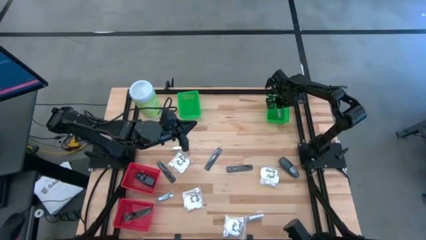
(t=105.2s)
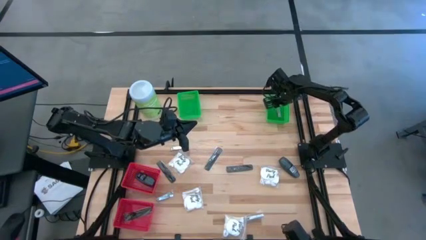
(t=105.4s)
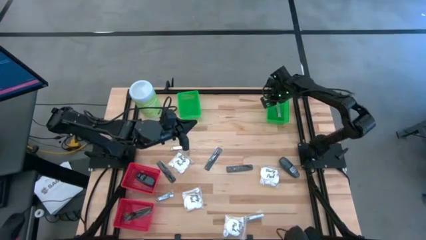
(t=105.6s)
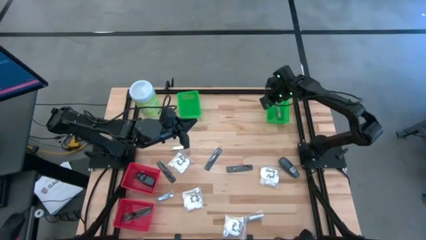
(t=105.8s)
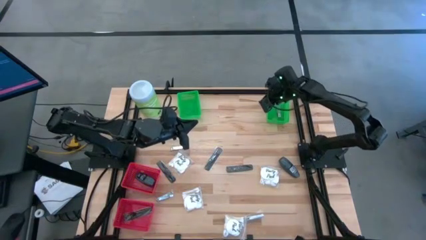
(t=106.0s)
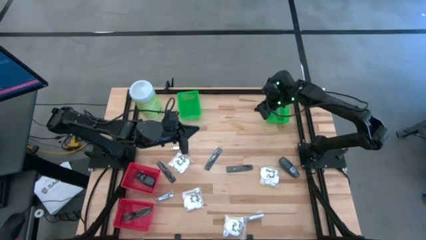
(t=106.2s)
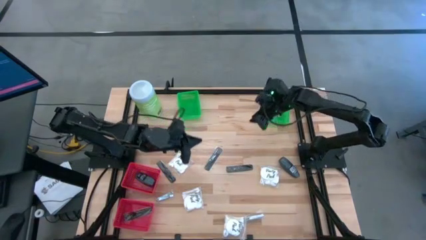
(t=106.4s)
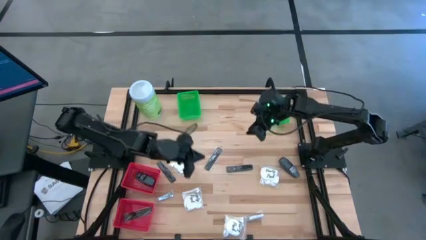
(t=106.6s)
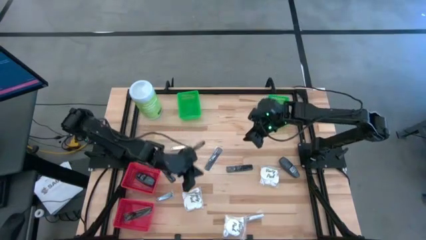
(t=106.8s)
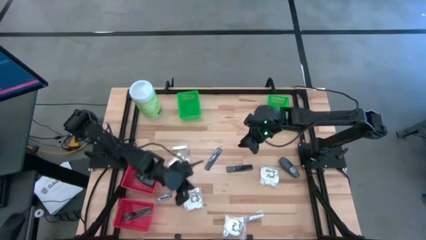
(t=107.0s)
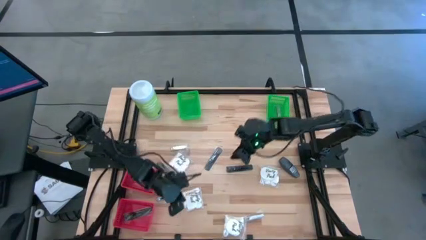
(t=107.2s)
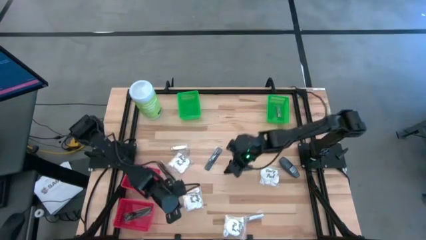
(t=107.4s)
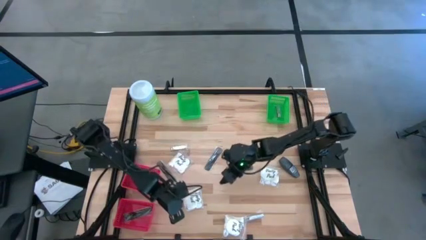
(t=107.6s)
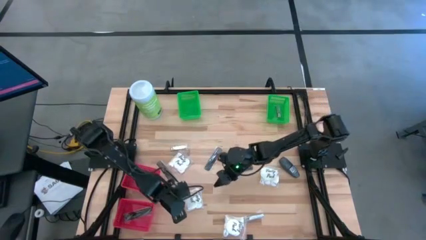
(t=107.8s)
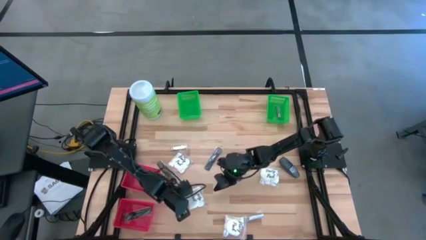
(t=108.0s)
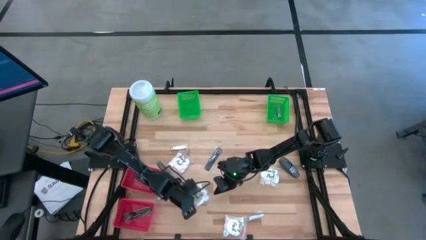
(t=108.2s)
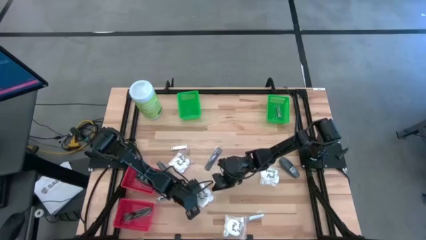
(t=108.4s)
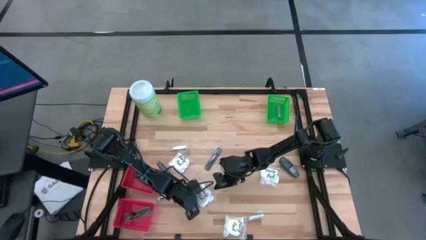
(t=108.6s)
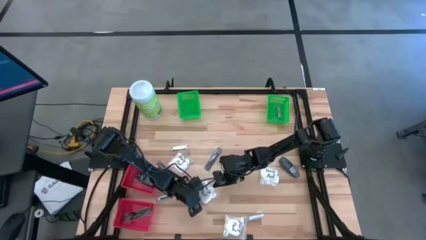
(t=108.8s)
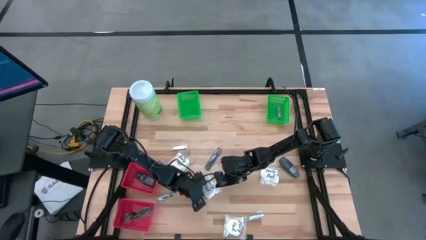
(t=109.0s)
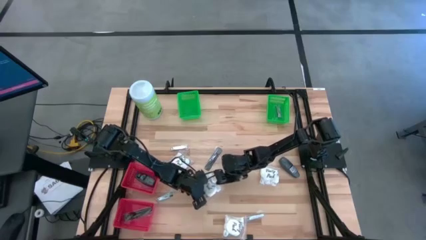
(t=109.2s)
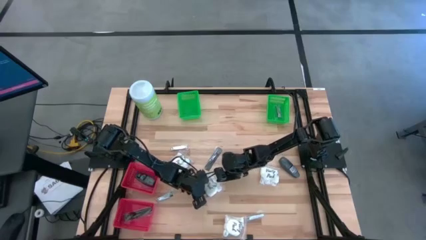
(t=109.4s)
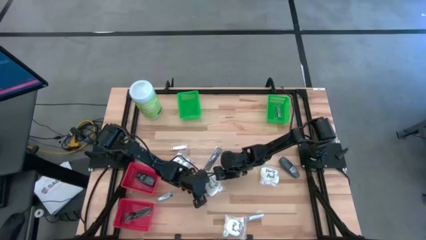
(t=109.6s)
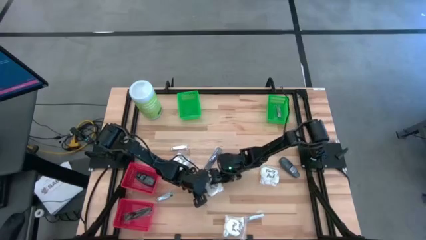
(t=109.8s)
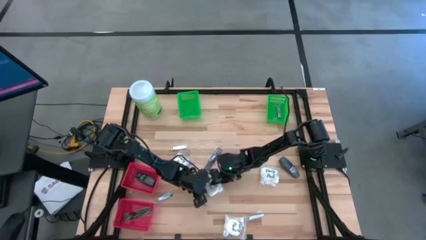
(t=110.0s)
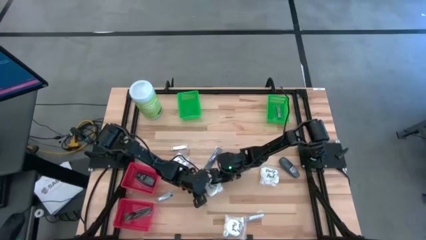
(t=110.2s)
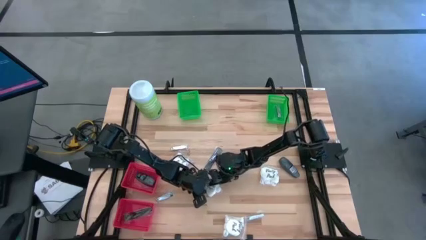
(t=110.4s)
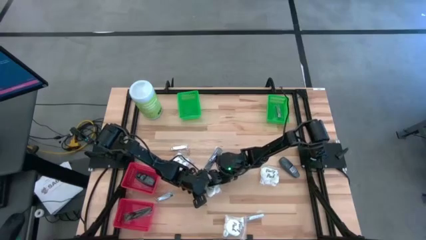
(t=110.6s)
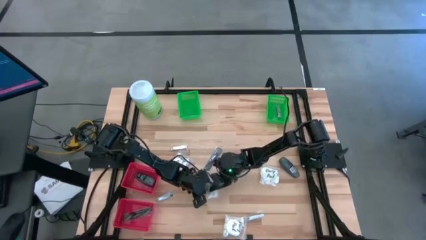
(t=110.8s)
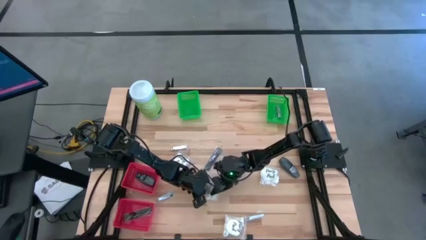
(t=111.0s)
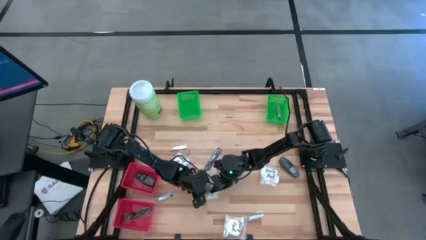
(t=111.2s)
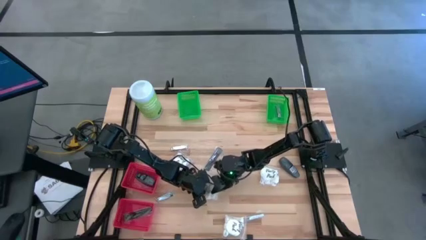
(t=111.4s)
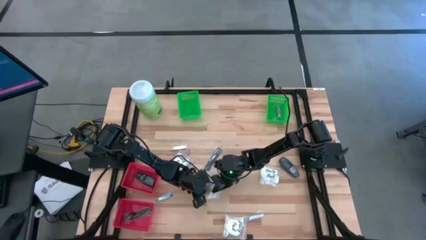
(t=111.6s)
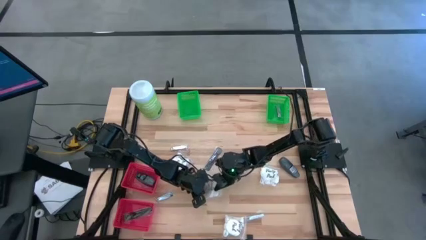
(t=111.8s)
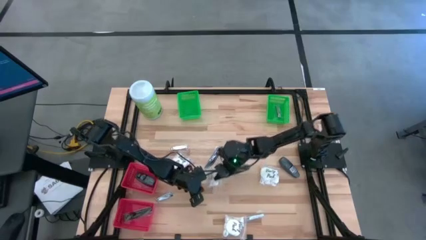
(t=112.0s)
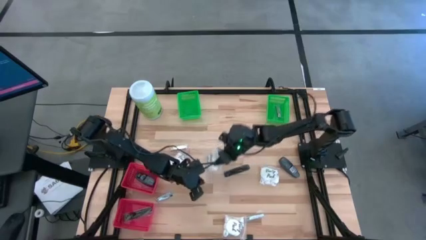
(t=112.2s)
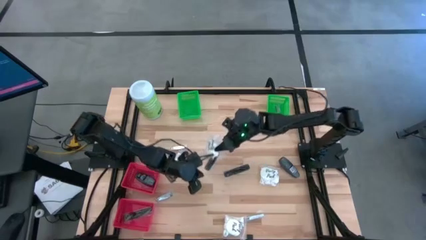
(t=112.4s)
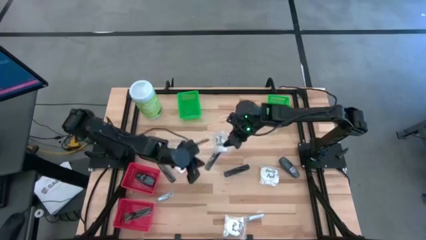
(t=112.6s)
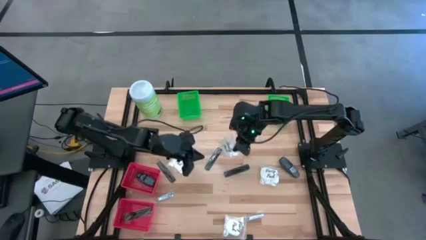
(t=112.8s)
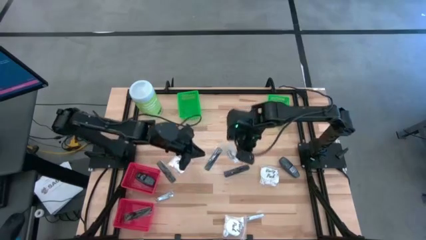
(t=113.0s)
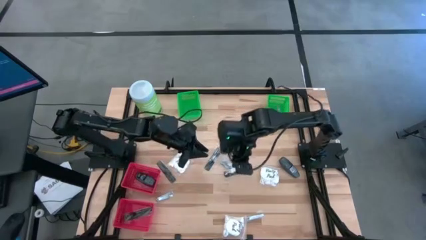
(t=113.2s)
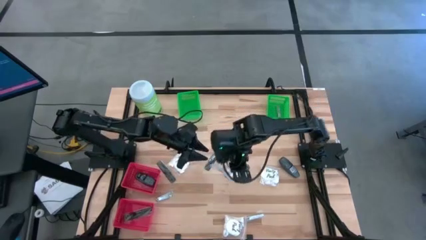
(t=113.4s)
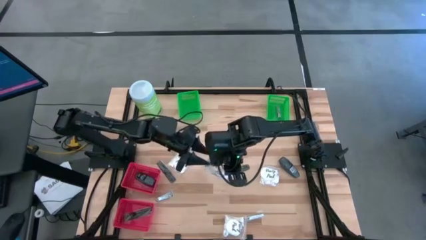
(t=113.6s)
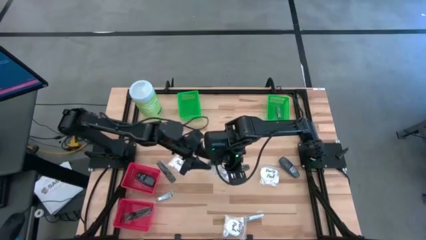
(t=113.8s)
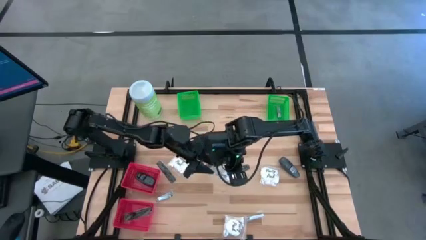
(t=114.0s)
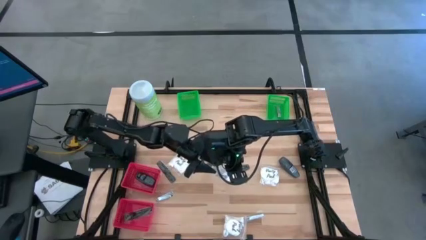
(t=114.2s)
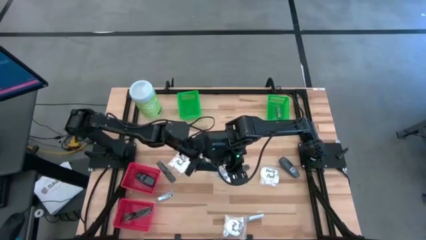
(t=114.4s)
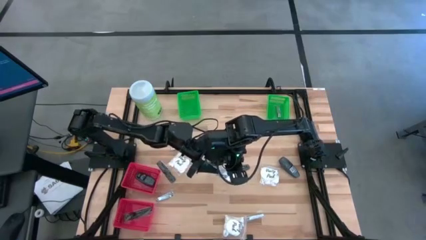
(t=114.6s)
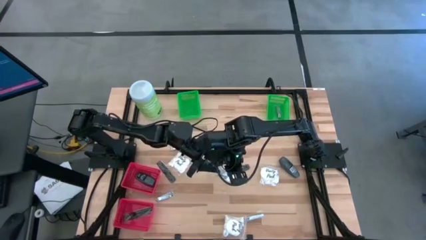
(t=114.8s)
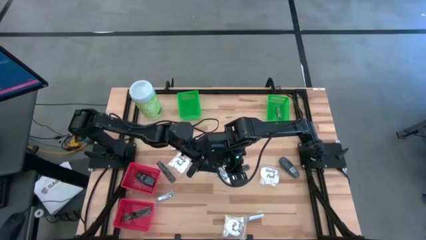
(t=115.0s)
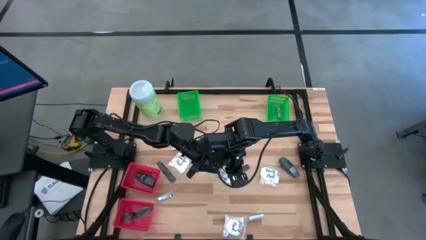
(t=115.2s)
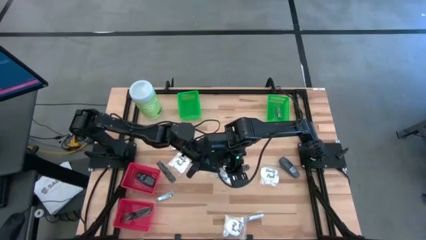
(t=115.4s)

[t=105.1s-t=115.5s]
Task: Pick & Place Travel size toiletries
Put the white vanity pack into the top left green basket

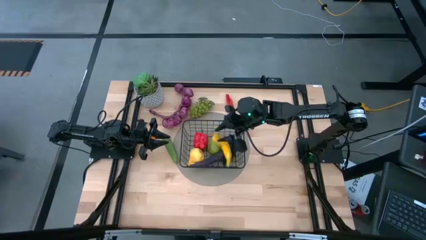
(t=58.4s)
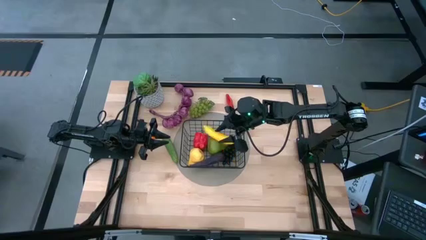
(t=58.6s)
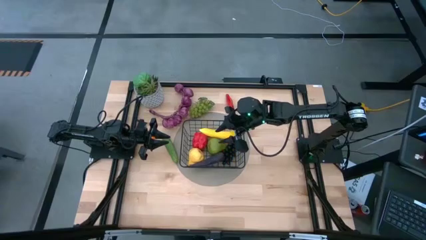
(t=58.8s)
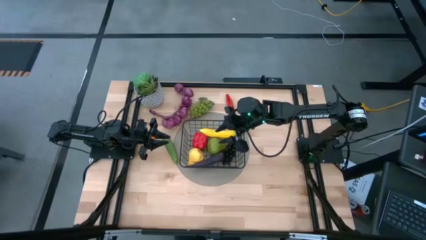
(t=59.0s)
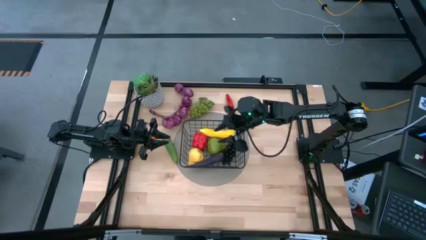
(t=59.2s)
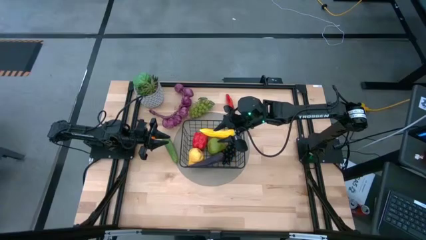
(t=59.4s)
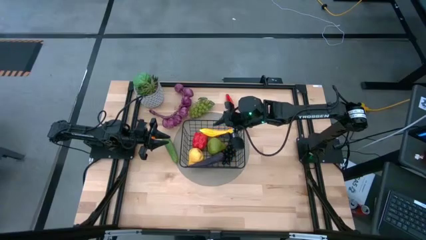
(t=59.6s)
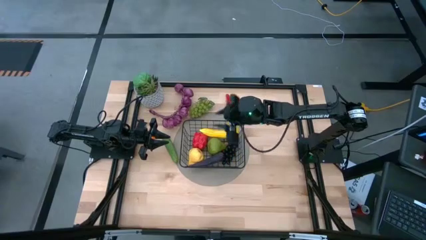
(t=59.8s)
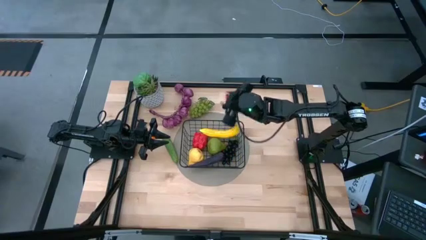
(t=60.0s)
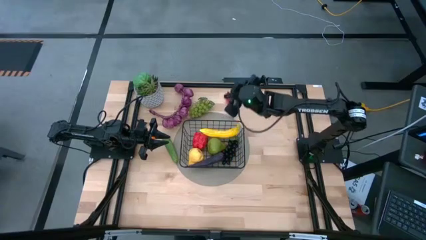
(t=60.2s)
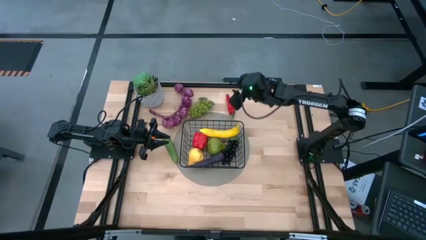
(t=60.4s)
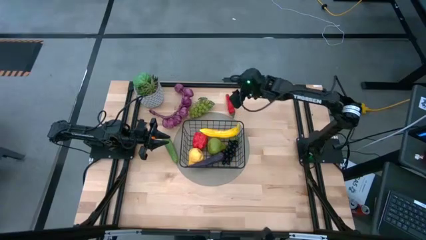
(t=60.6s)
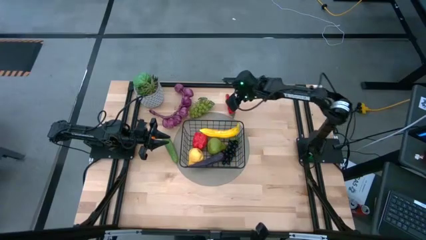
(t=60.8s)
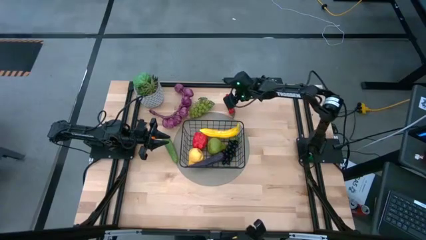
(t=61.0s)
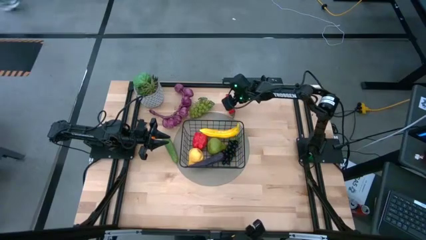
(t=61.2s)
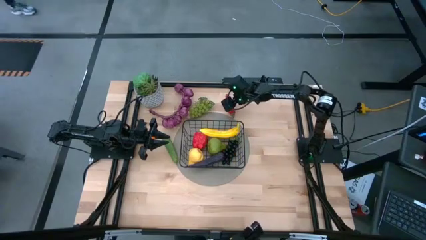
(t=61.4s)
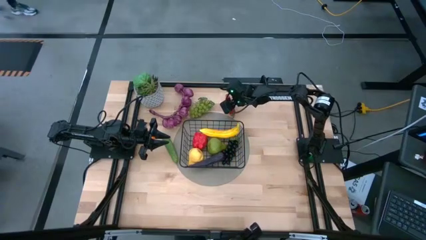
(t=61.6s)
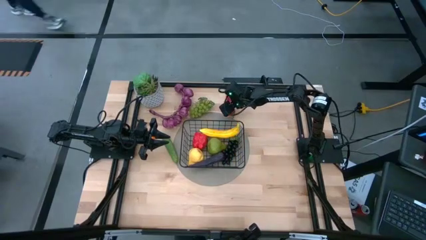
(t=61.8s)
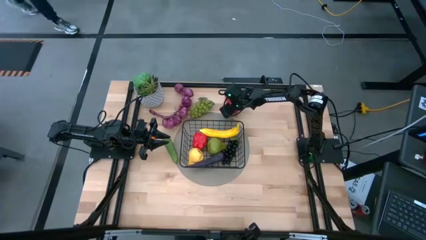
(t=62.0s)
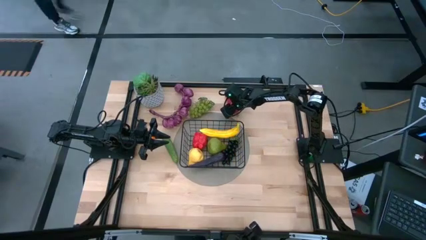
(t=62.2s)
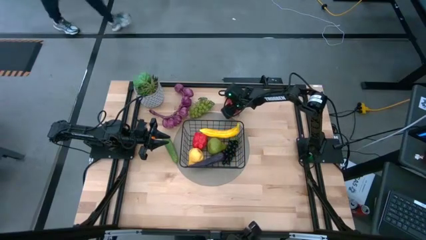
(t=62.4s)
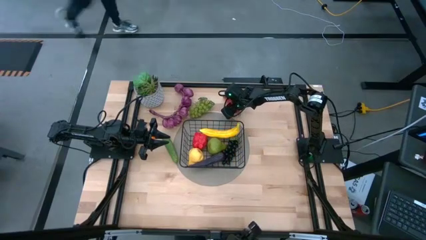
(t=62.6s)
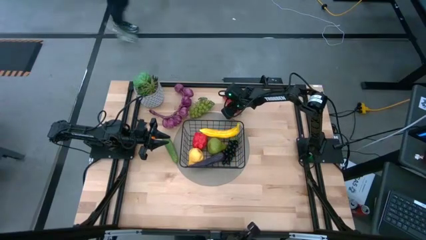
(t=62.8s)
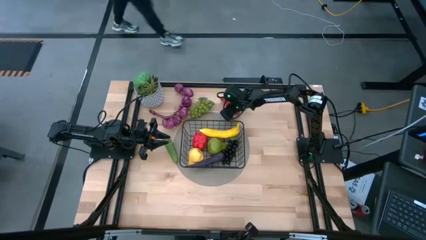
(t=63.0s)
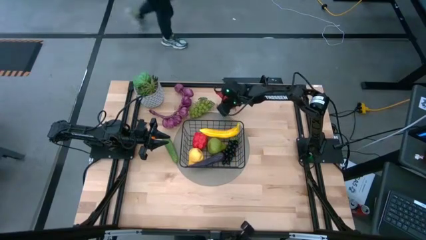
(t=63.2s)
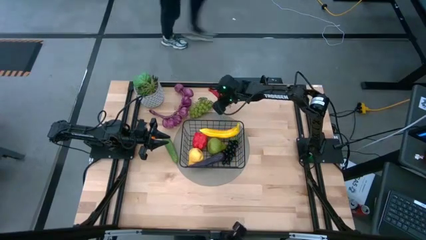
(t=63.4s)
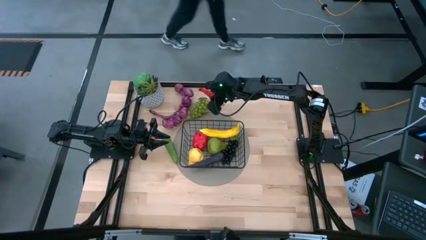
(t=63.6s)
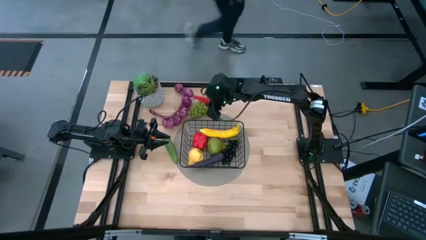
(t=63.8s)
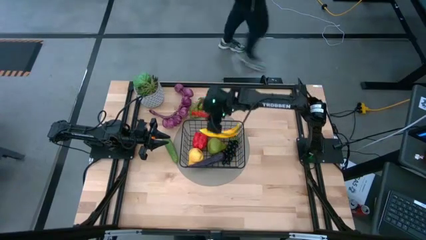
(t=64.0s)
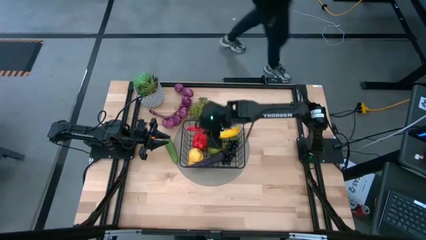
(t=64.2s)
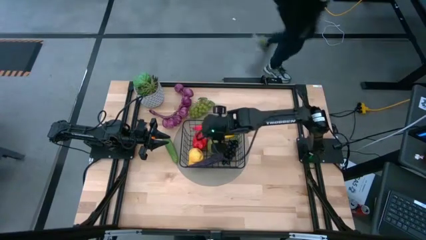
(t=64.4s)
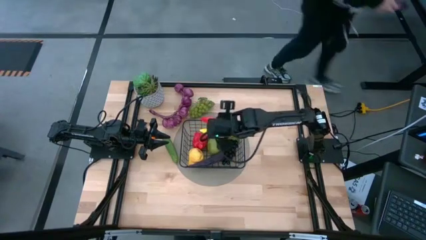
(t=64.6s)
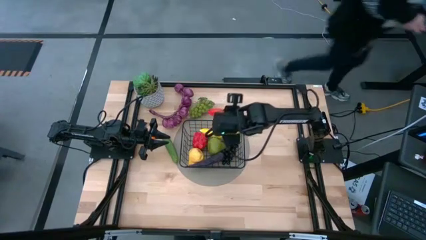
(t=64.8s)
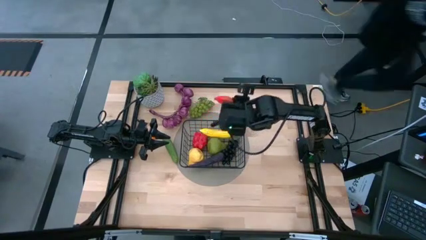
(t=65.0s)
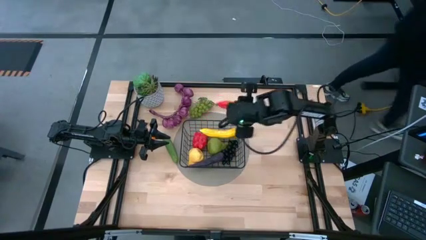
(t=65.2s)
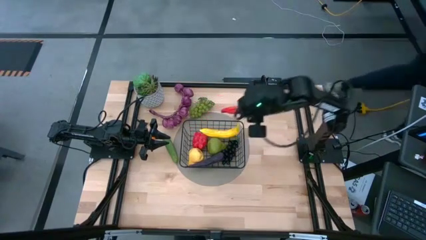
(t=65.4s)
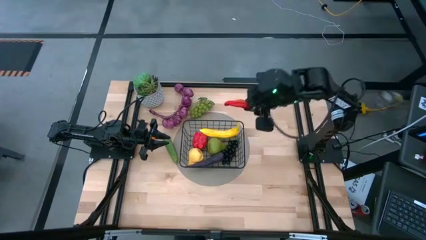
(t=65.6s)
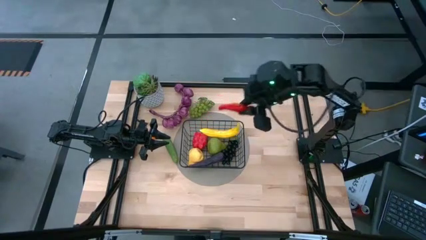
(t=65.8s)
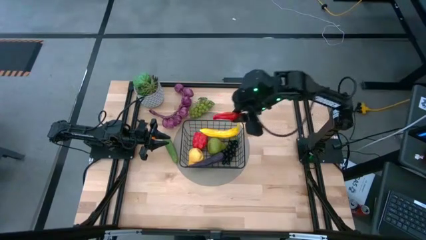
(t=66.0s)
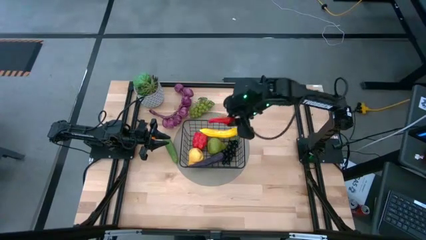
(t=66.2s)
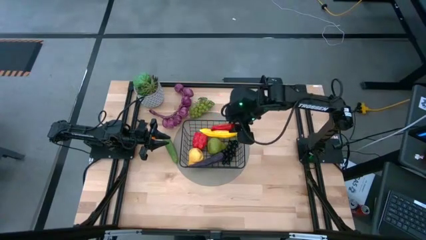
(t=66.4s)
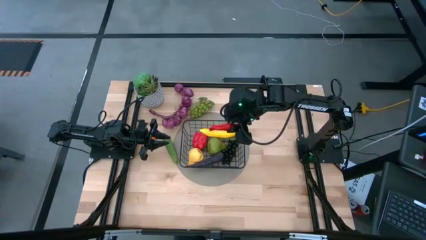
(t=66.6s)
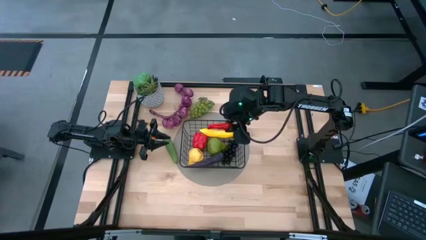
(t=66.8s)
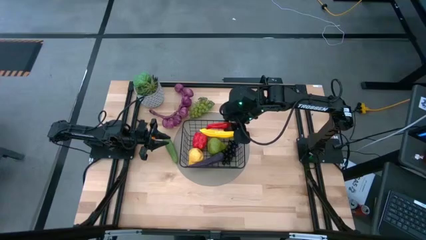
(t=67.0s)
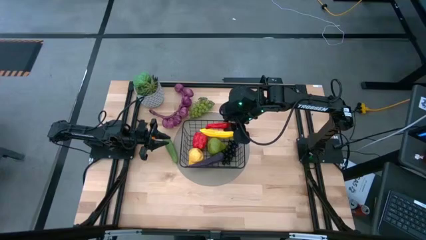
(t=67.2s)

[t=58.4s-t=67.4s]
Task: Build produce basket
Put the red chili pepper into the black wire basket
